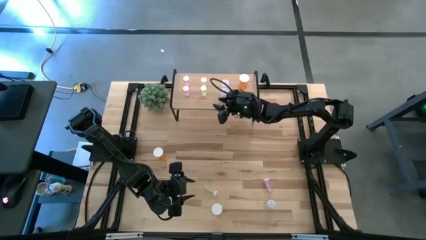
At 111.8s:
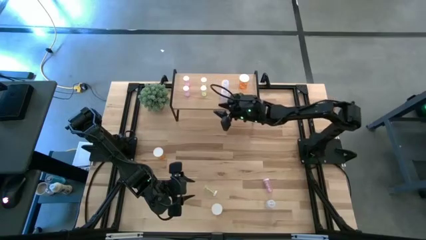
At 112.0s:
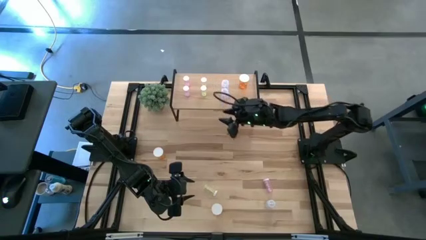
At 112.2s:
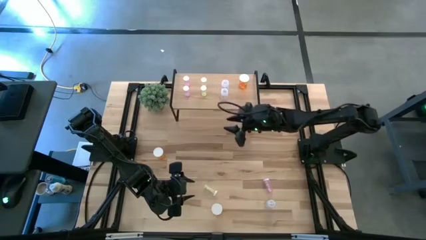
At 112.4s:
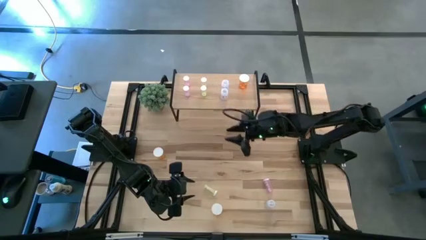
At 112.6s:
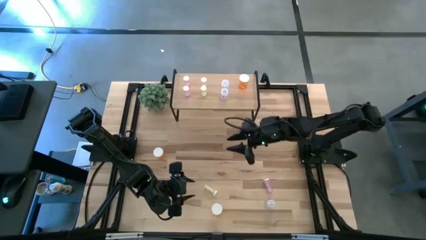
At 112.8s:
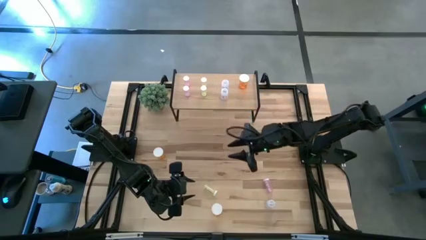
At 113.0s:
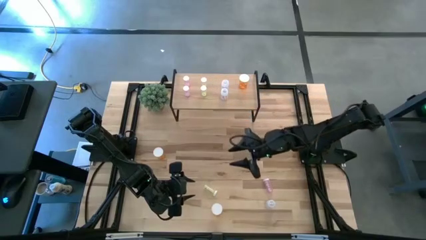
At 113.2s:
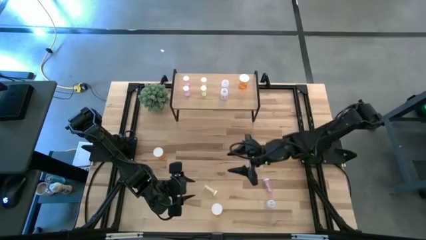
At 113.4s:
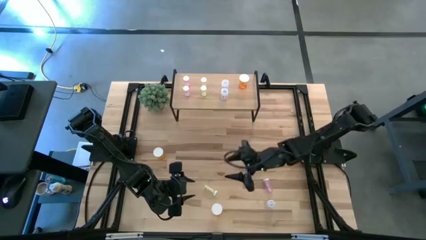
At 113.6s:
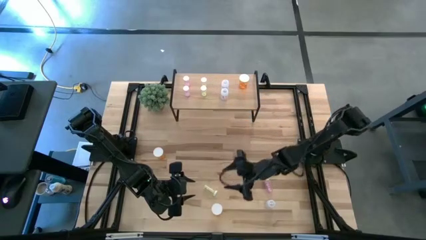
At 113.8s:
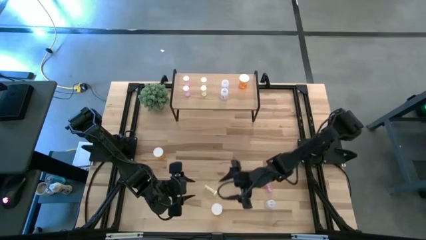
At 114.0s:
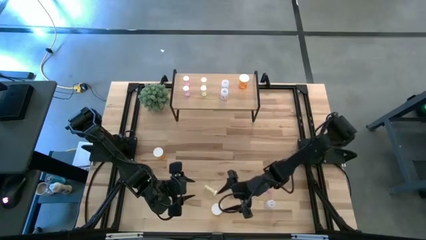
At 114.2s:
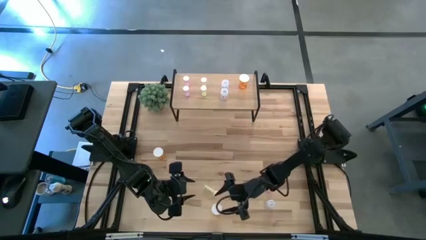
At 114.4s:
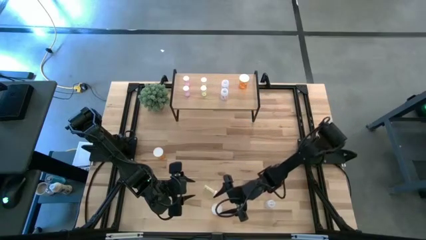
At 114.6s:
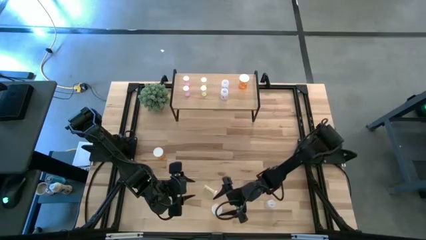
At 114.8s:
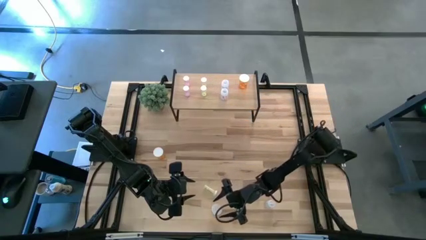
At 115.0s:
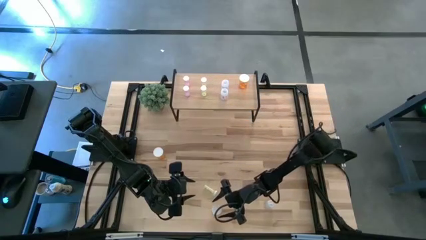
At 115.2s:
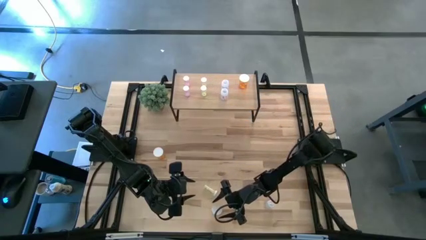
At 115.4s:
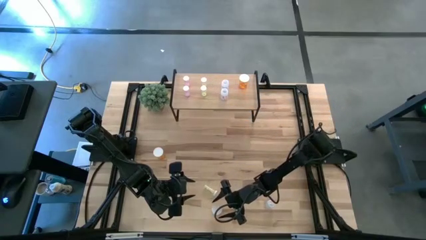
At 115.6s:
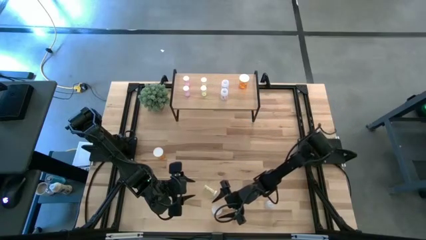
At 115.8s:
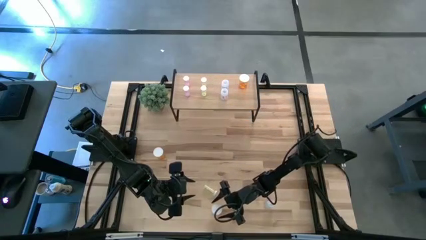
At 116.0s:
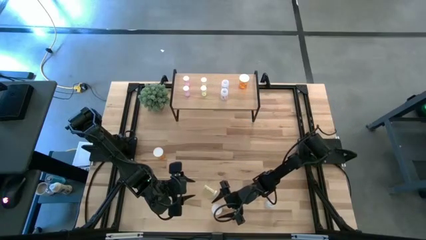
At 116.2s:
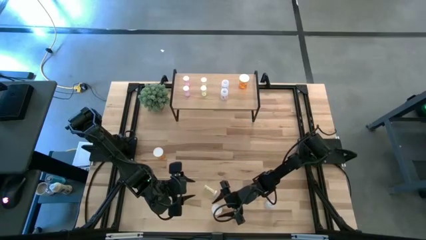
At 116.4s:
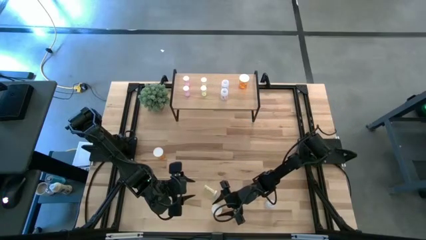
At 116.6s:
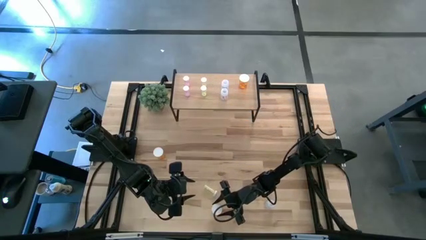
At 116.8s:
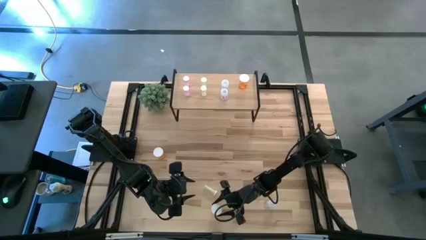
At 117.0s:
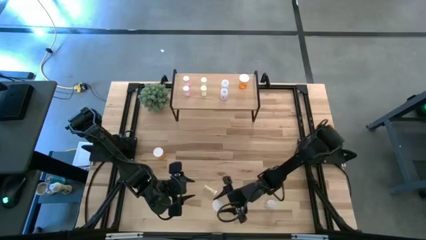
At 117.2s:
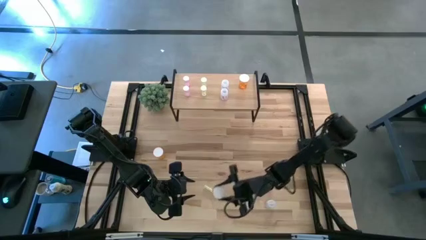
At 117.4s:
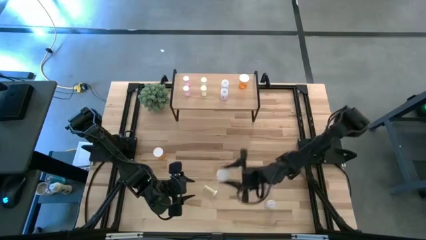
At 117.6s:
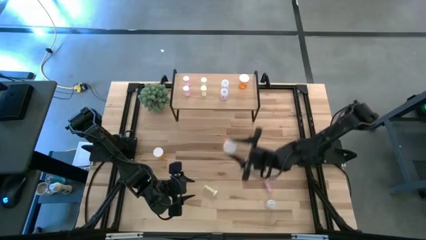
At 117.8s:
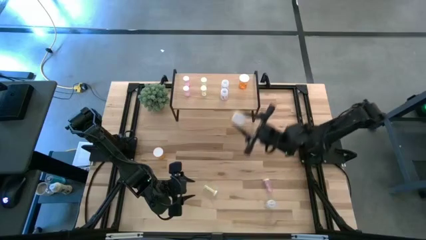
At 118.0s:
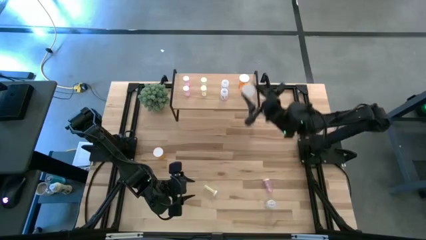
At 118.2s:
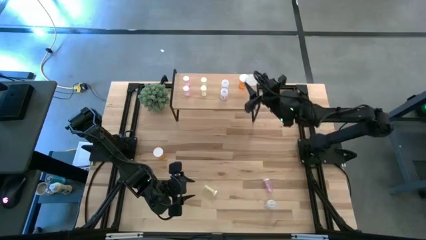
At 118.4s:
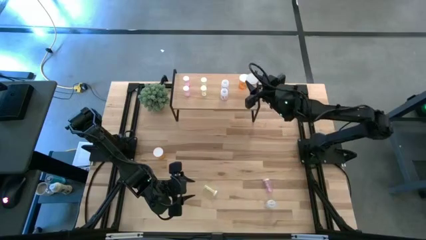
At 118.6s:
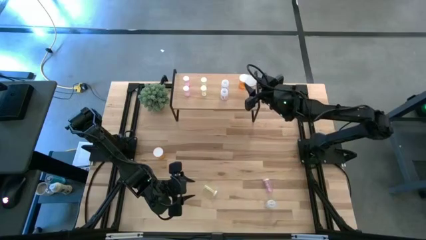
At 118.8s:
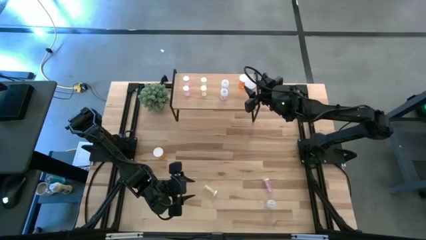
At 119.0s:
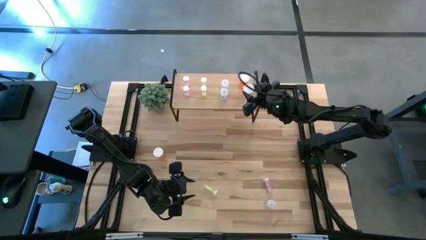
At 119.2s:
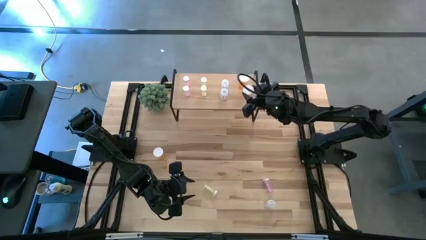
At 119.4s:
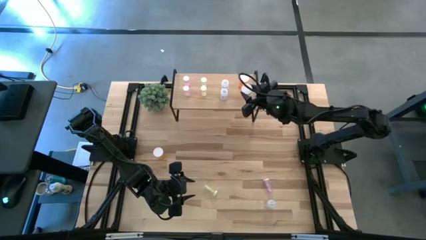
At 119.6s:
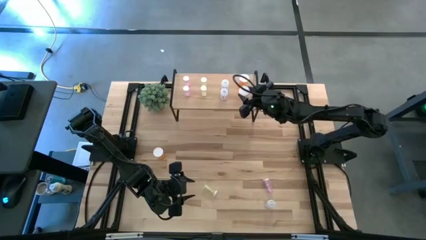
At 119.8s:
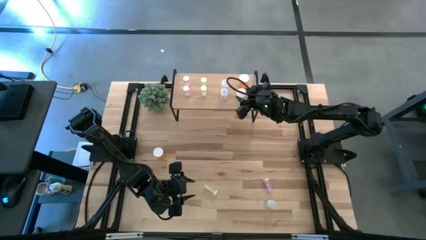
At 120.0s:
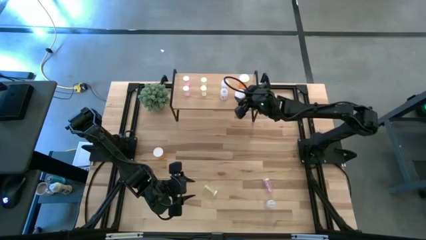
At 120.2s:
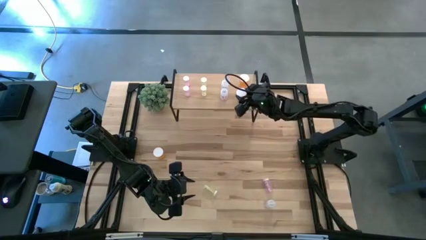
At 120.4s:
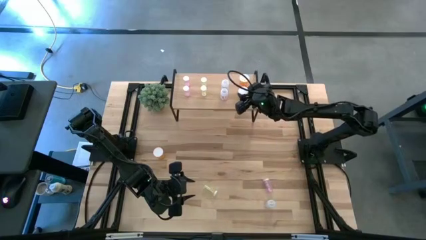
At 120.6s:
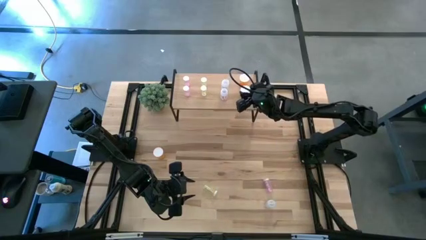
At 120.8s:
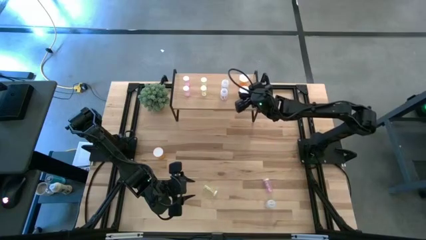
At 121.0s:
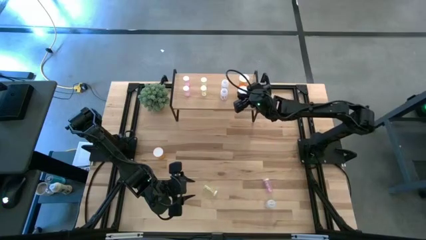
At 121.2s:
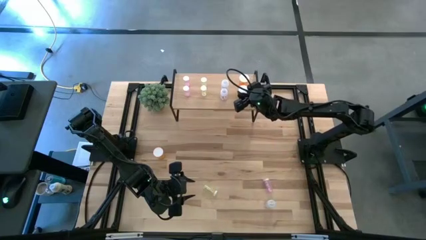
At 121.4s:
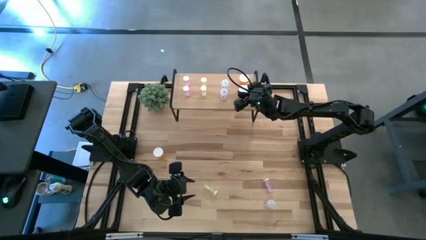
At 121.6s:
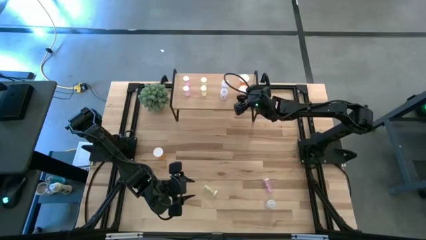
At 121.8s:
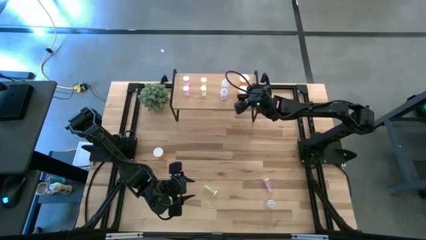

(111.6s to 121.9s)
Task: Pick and place medicine bottles onto shelf by color
Put the bottom orange pill bottle aligned with the other orange pill bottle on the shelf

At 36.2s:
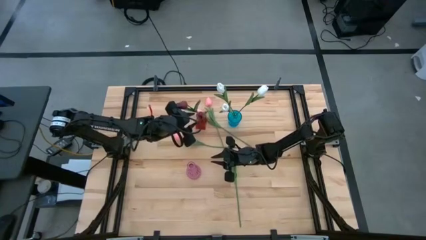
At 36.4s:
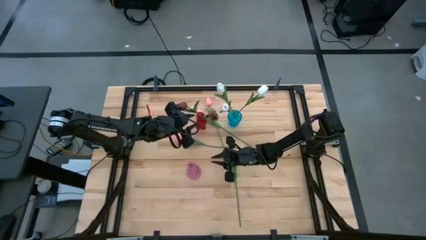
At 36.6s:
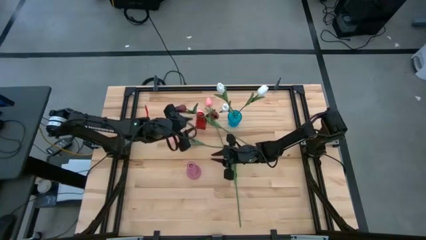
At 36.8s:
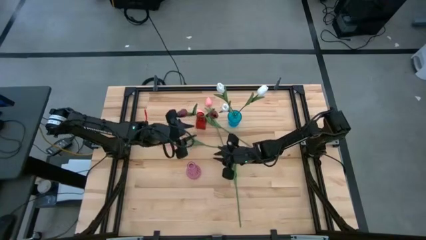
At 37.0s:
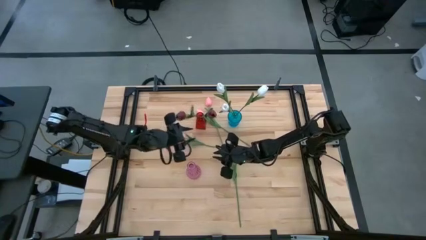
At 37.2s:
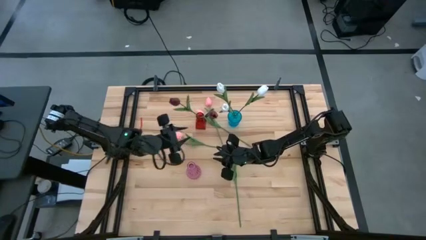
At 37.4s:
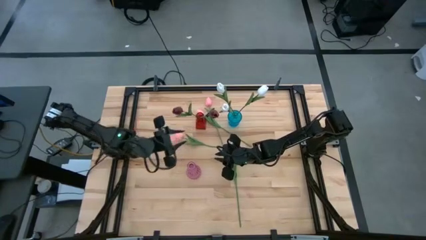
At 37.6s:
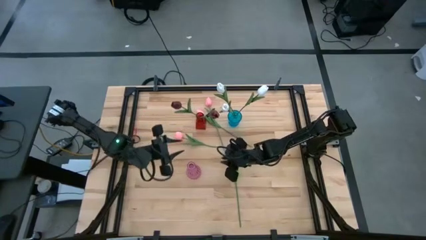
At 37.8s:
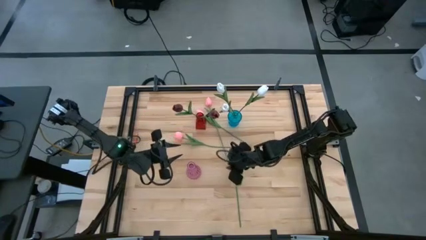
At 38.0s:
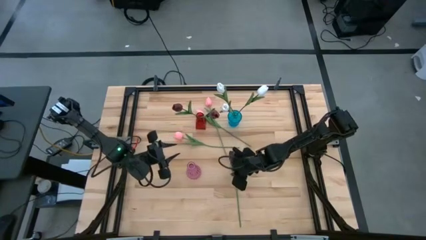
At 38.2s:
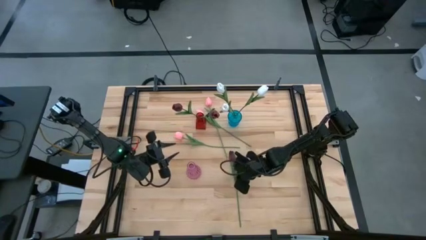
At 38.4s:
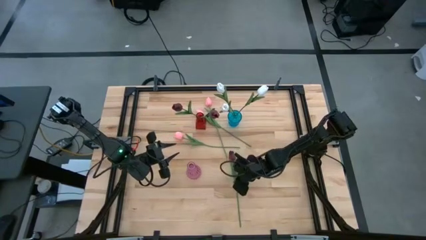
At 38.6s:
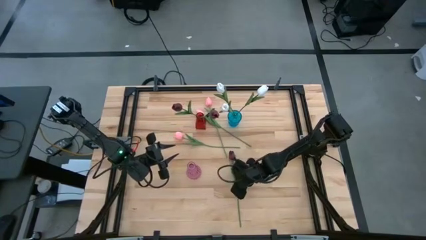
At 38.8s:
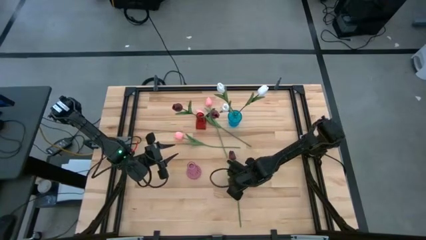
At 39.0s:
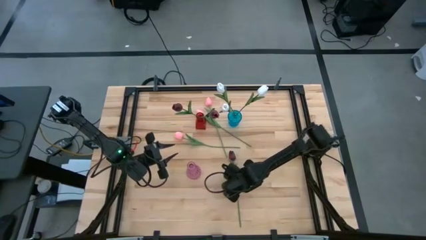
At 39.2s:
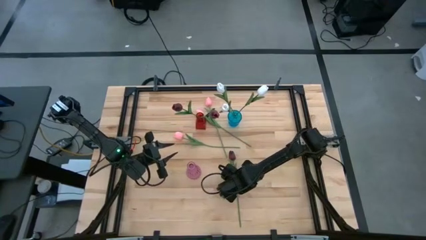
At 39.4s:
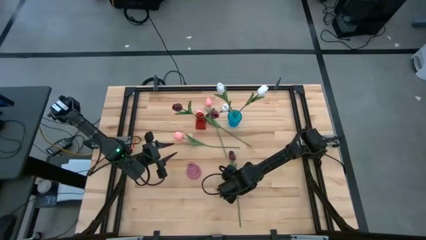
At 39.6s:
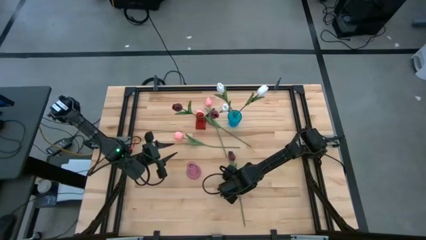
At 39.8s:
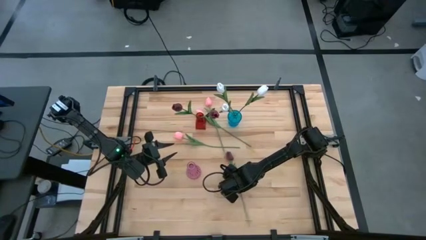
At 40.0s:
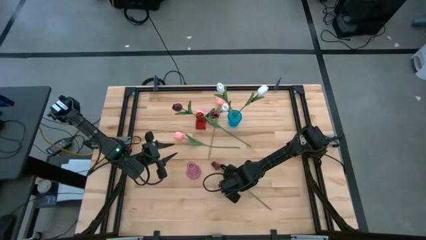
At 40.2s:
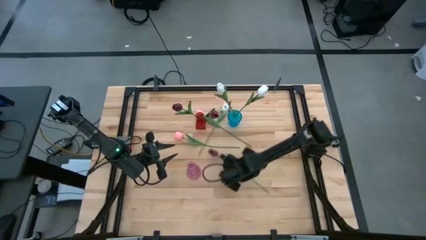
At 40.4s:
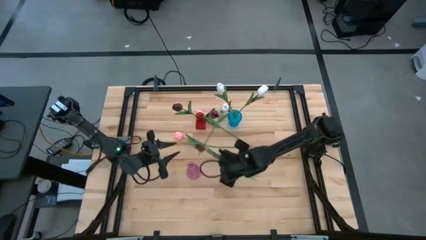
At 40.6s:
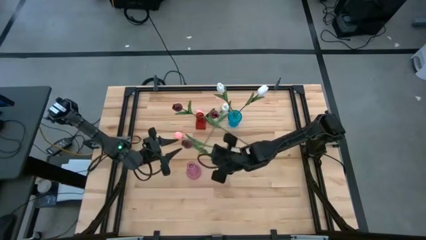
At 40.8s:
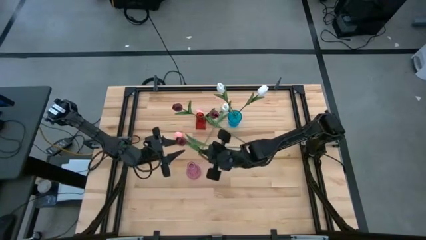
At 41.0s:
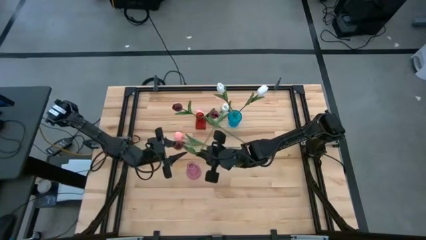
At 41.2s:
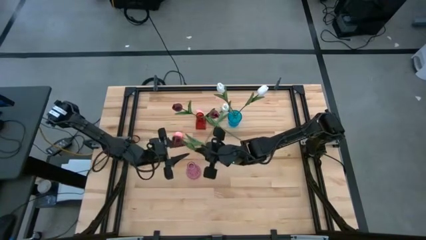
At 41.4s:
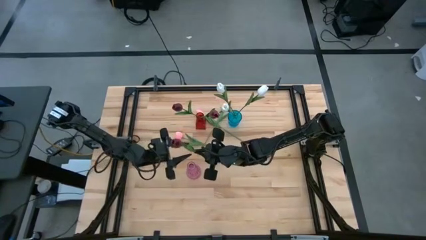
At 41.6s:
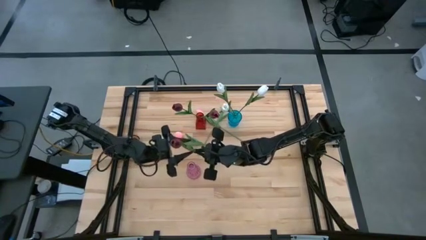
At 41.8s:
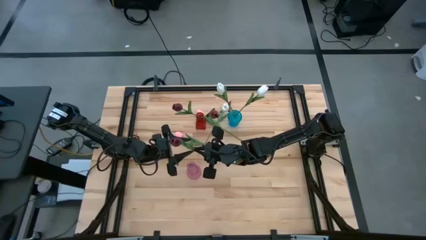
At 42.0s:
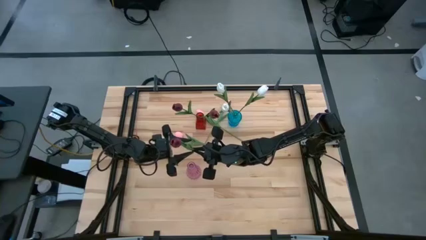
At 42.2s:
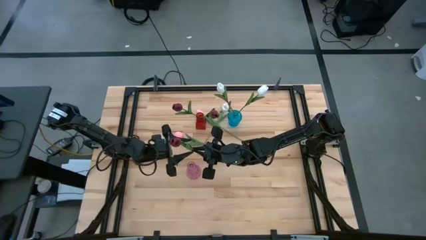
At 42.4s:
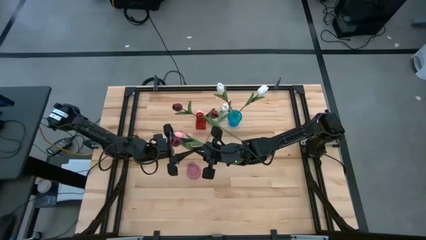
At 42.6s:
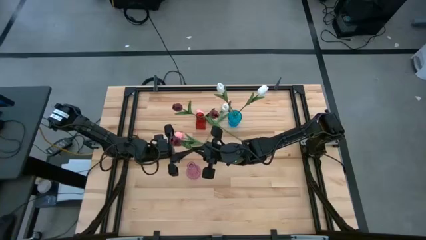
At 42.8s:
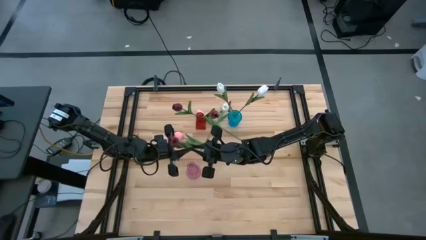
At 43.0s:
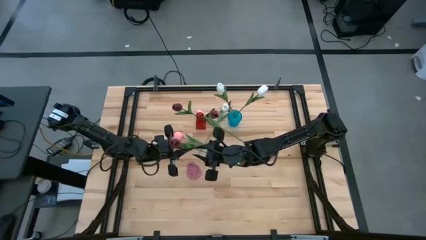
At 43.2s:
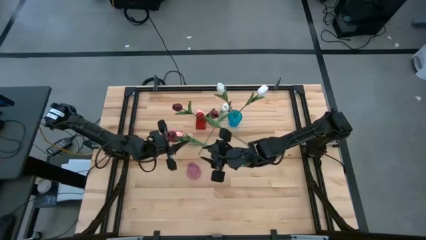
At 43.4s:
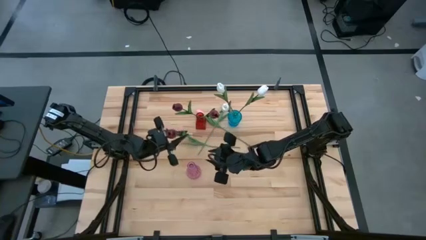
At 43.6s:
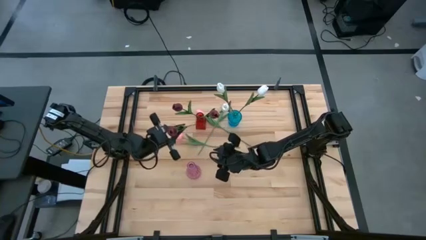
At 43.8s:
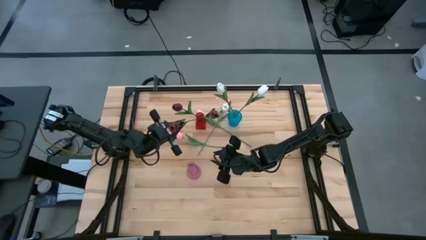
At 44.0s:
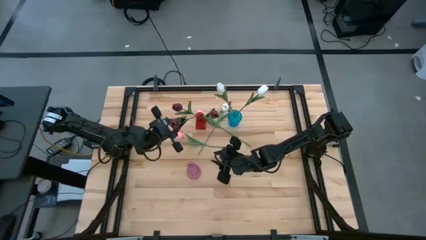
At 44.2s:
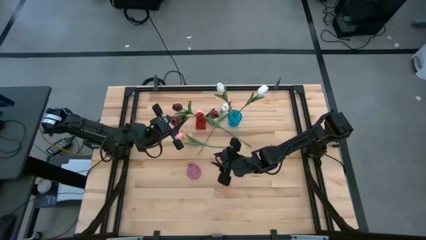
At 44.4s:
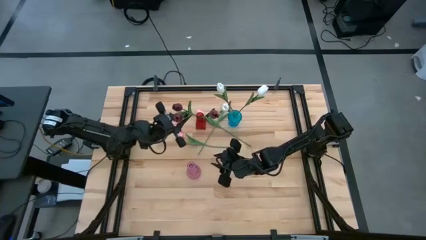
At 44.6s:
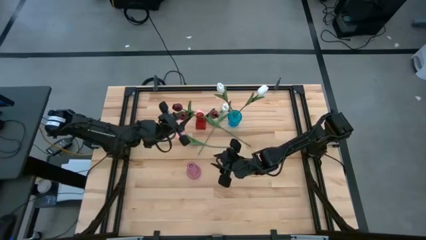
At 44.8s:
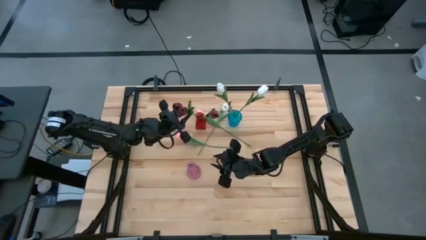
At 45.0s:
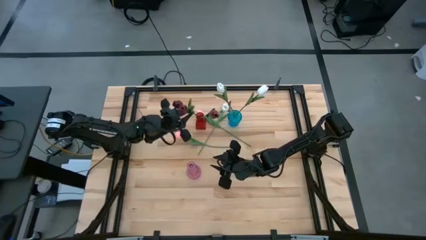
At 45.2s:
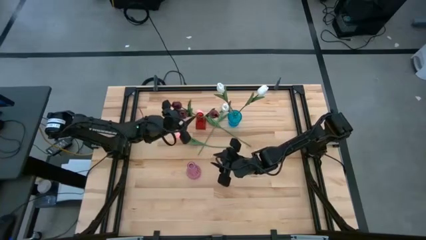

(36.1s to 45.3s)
Task: Sort flowers into vase by color
Put the red flower into the red vase
